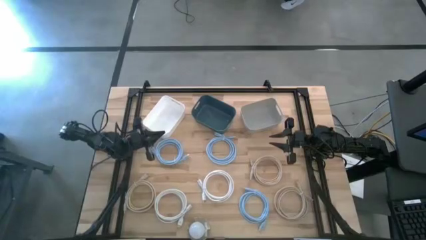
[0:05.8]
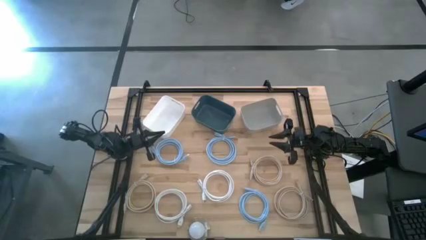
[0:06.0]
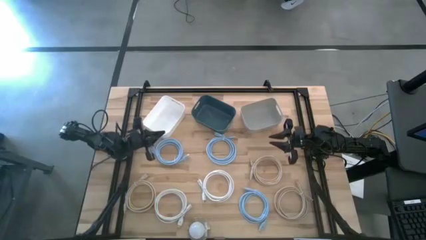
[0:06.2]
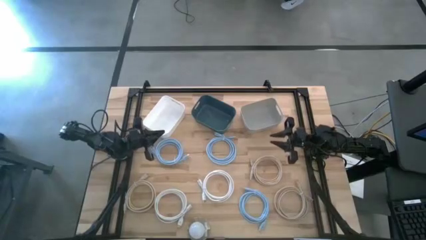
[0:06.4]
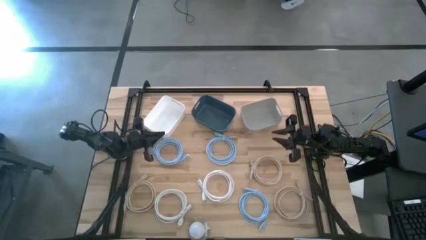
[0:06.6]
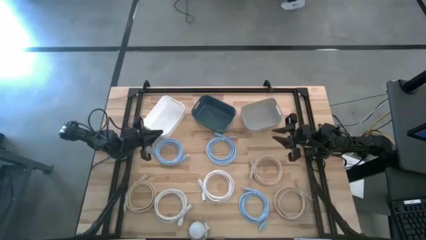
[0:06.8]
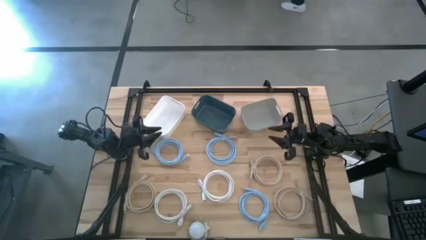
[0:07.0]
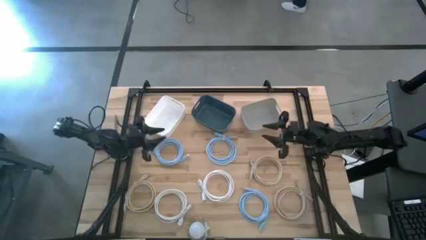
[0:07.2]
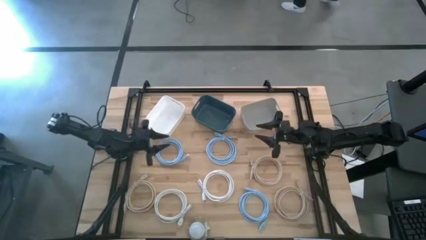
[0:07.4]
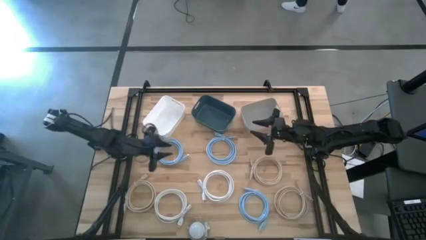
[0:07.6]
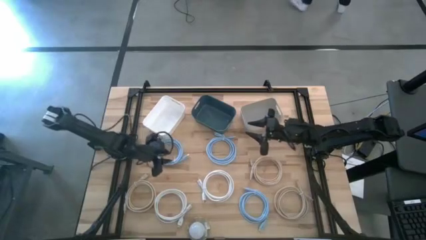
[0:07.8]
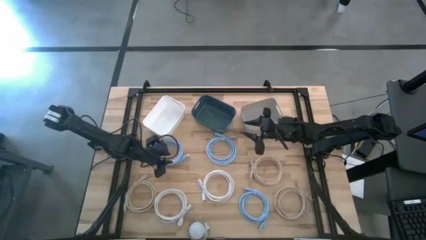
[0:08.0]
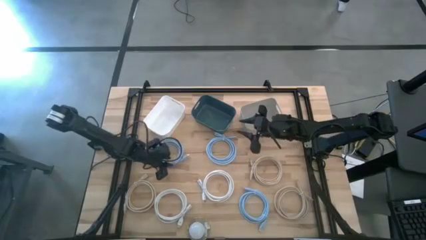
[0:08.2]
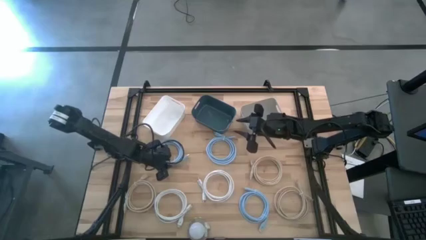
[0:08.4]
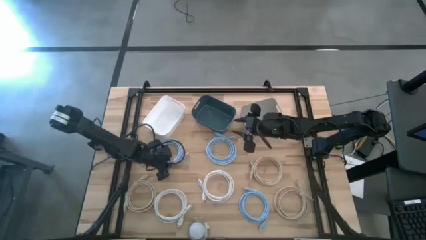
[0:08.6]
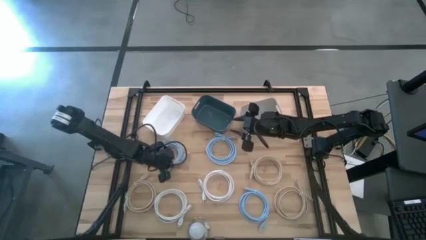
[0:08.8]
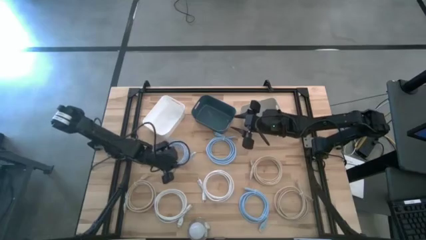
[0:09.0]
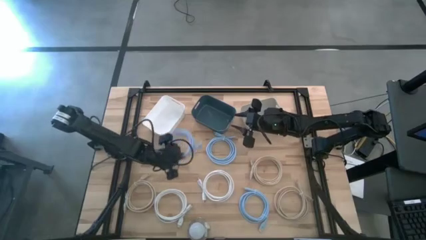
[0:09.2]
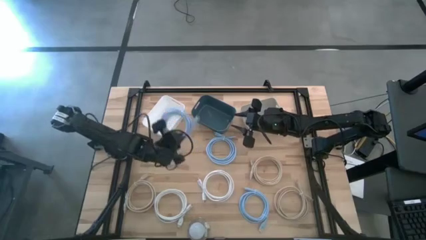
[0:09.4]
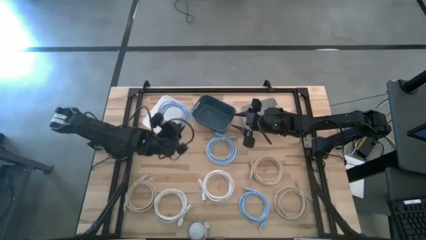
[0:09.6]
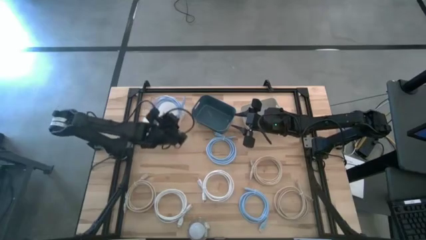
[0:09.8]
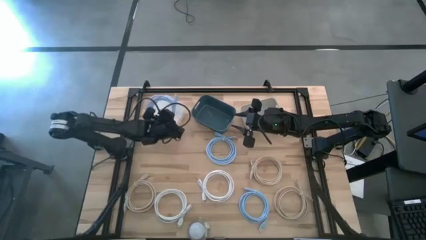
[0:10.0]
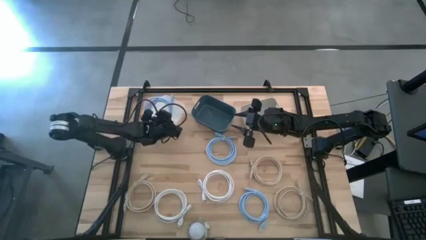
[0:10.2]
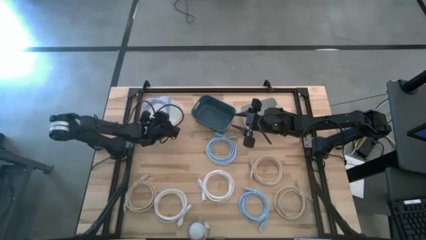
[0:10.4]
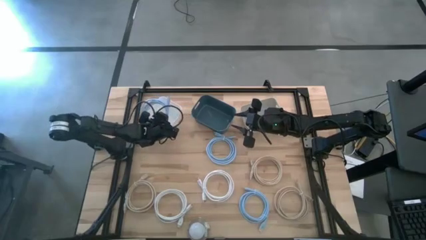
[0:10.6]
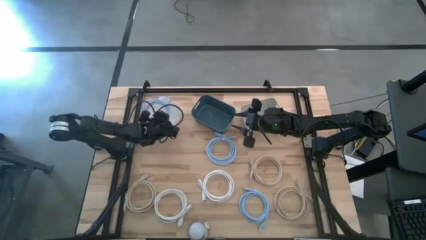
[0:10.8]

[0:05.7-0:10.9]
Task: Pick & Place USB Port
Put the top left blue charger cable into the white bin

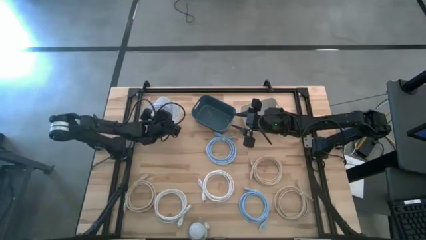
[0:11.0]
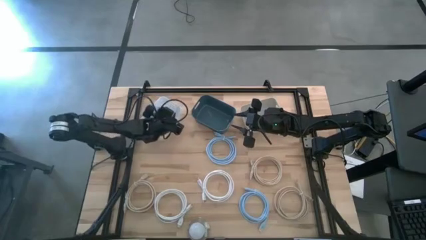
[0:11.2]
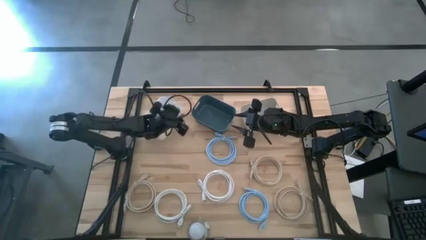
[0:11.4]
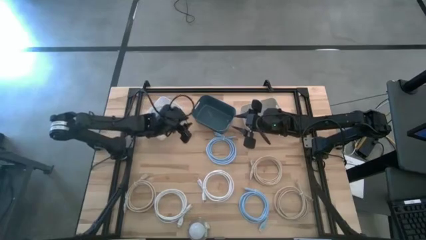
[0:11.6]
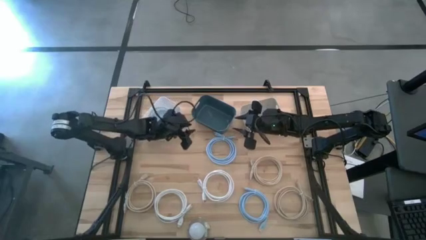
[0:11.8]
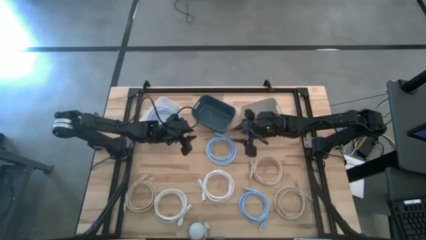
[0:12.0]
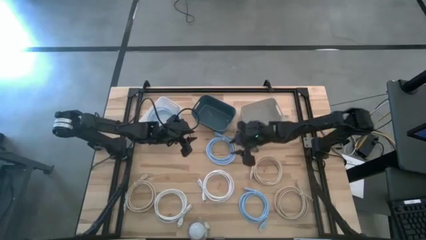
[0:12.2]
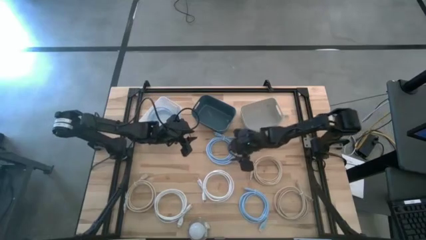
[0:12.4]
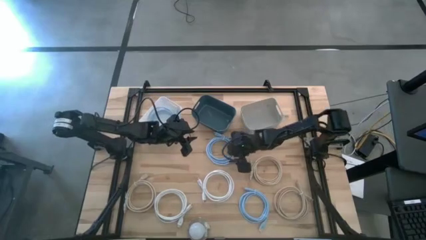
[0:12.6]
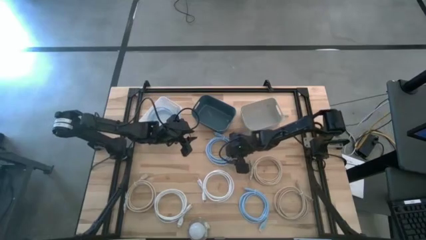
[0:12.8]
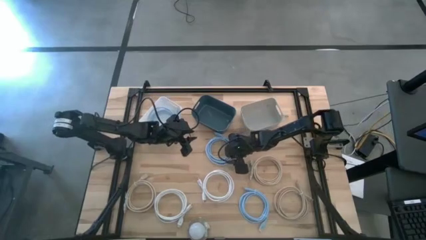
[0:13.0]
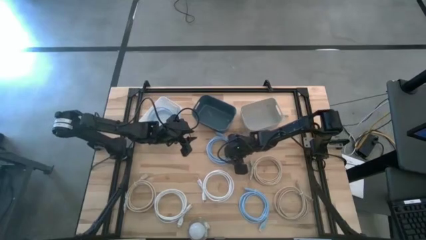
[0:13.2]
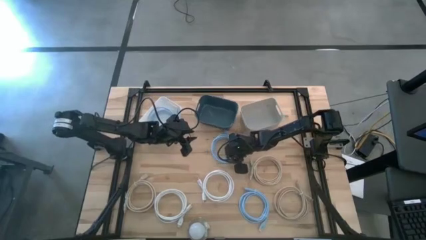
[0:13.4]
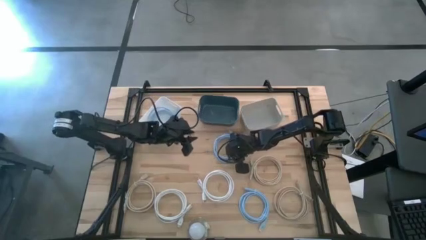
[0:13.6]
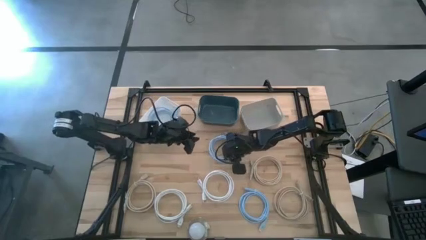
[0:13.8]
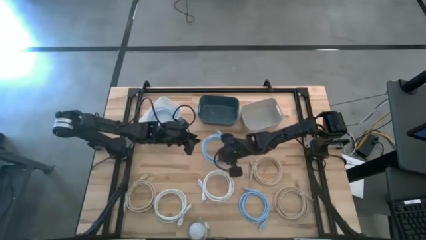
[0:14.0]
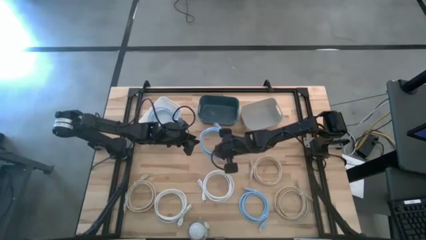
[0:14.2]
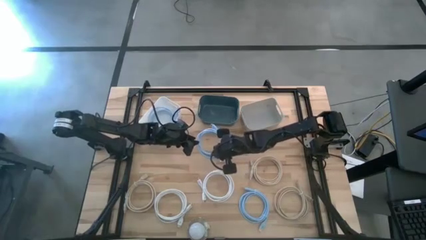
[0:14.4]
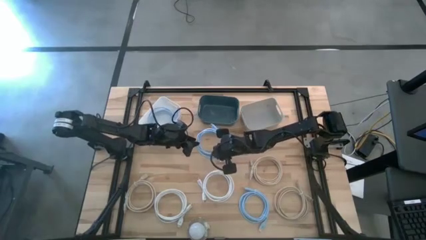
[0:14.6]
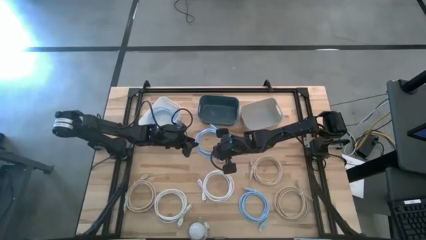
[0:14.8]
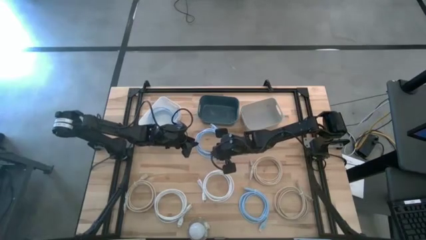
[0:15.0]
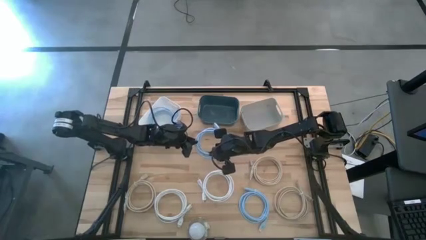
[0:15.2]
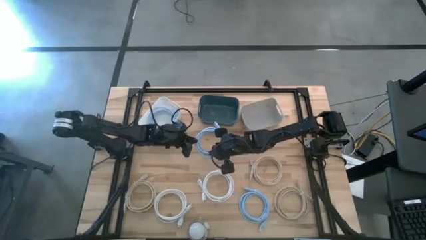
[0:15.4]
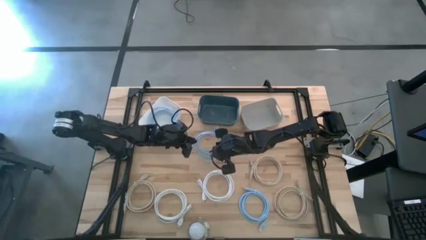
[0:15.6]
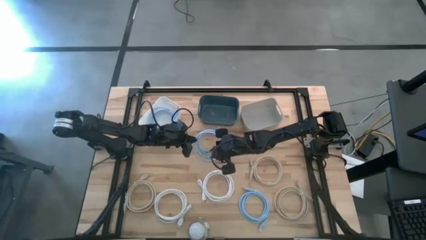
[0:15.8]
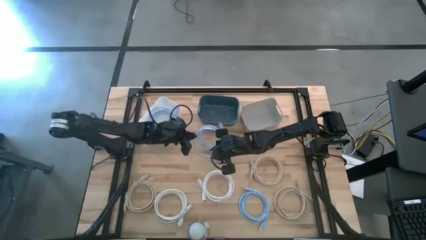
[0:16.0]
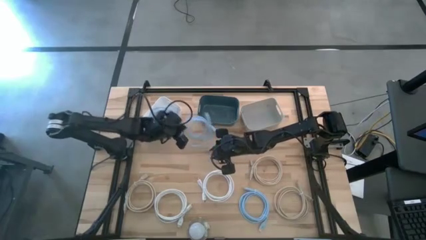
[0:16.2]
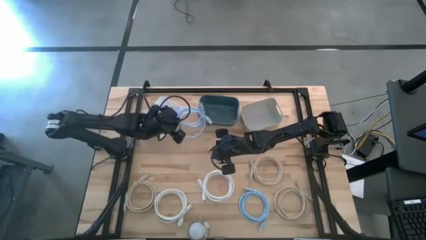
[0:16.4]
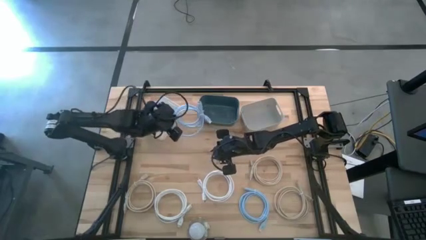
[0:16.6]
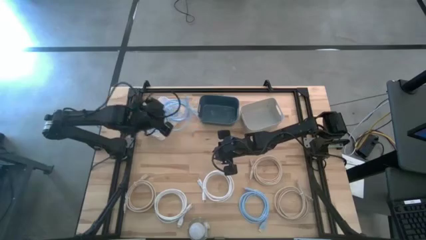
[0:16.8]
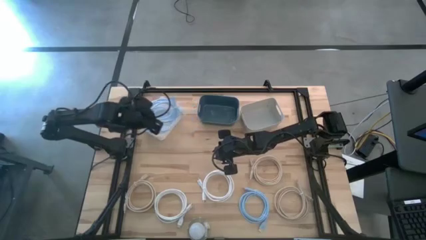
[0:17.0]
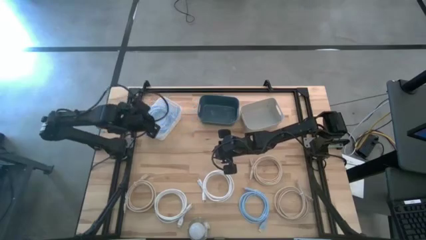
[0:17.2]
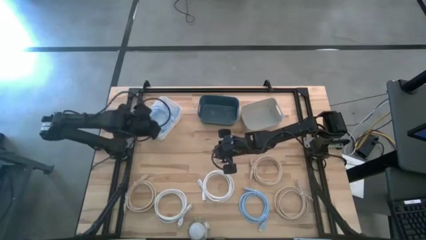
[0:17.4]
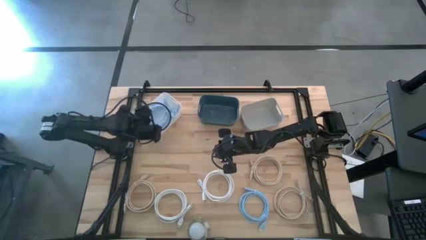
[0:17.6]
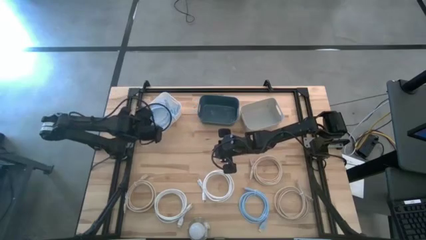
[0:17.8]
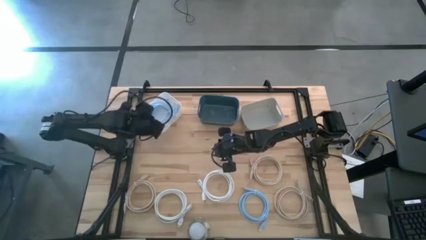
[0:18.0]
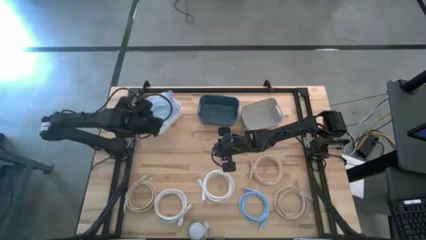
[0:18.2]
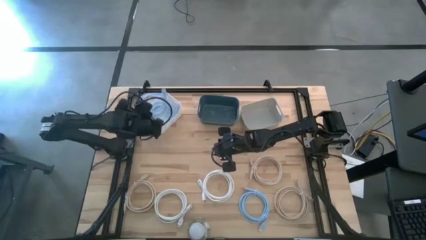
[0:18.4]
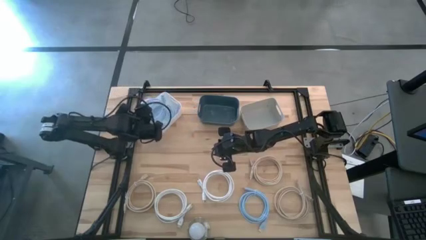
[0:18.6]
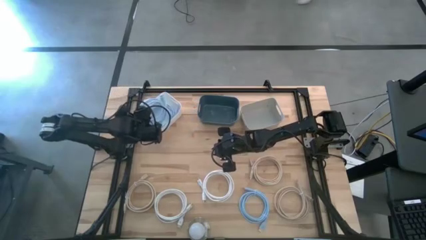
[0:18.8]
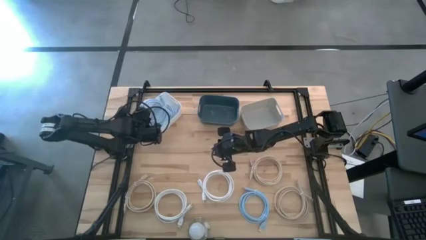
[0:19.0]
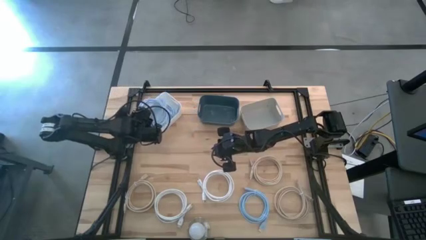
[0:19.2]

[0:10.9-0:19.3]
Put the top blue charger cable into the white bin

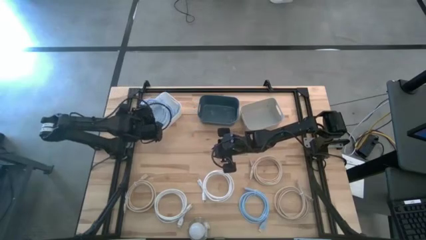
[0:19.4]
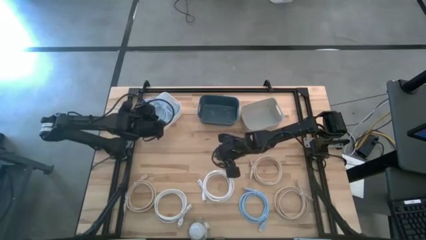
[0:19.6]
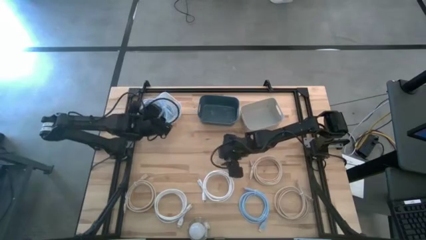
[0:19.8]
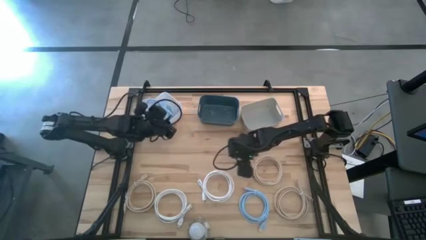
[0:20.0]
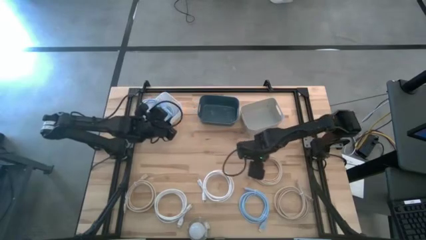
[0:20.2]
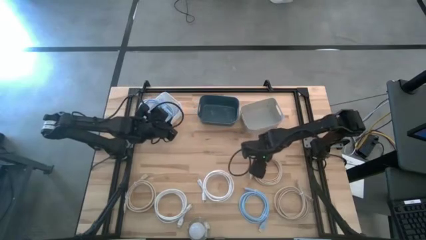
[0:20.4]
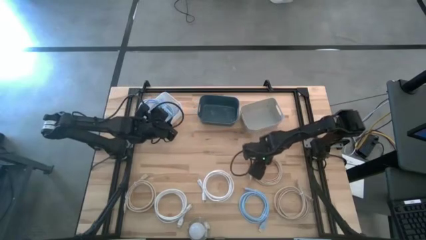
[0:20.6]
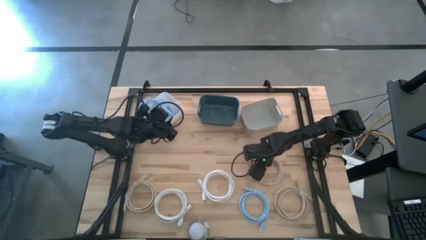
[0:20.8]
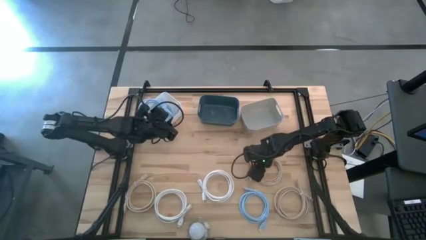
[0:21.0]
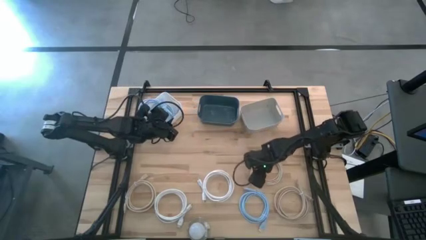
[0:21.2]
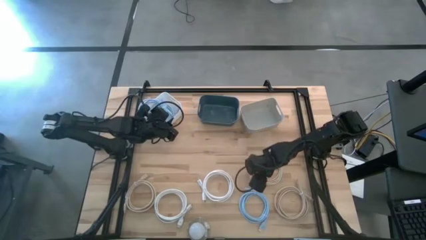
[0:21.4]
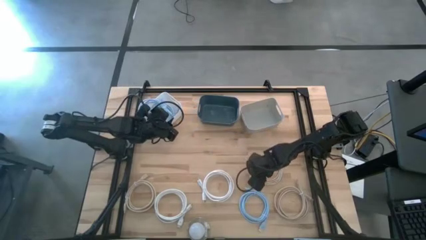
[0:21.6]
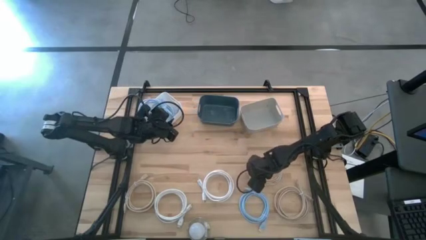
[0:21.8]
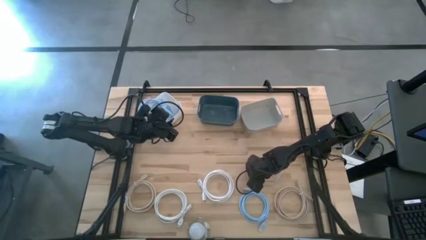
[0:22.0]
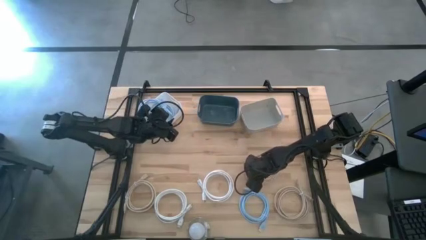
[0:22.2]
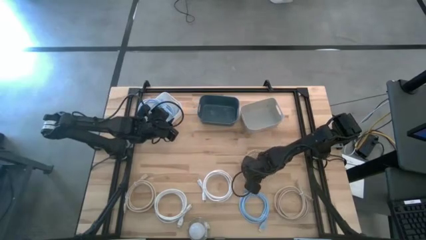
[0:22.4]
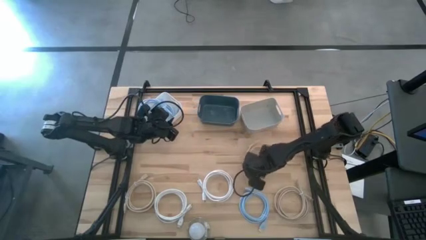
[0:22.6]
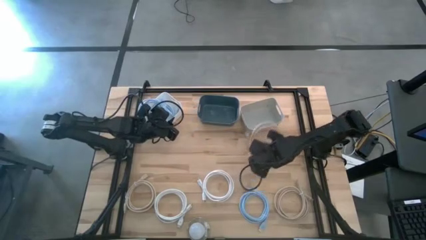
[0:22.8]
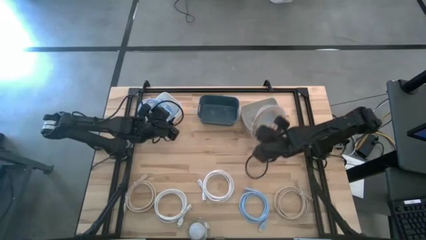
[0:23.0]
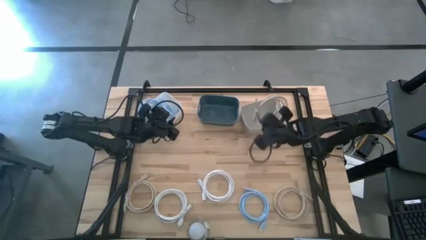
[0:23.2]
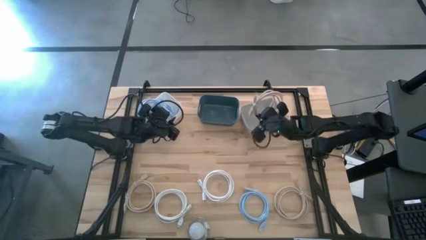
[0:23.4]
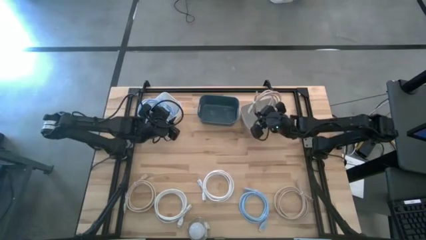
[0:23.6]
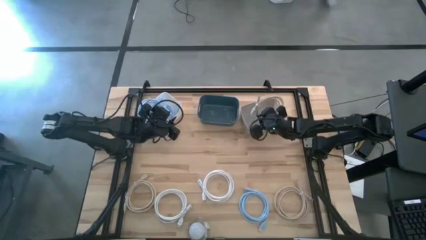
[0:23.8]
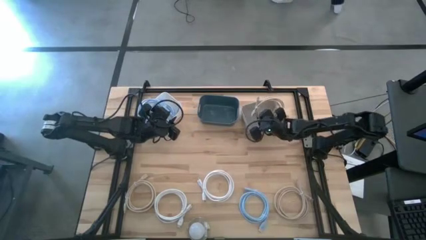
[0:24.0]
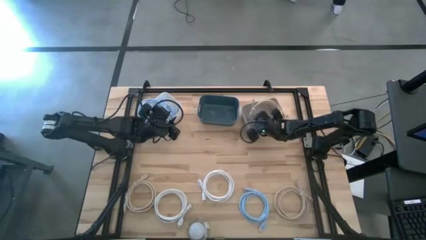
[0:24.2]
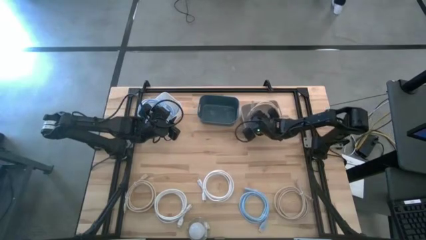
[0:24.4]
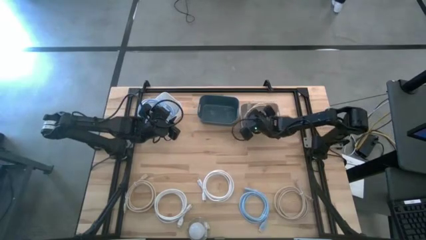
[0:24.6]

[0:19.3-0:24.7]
Put the top brown charger cable into the brown bin
